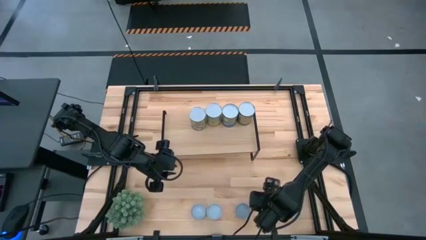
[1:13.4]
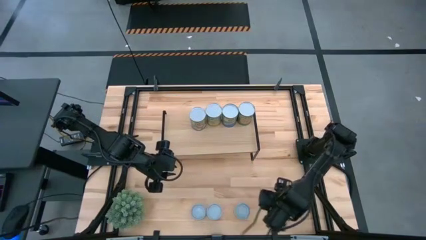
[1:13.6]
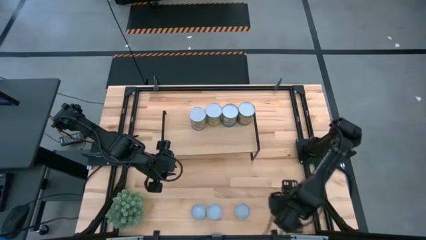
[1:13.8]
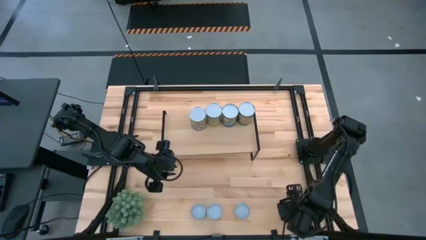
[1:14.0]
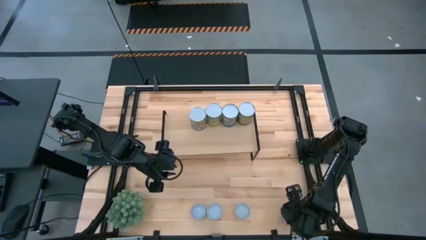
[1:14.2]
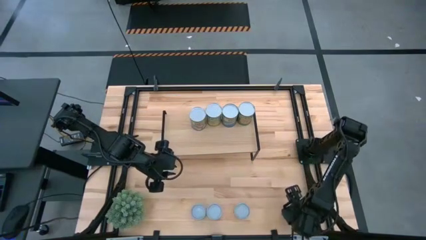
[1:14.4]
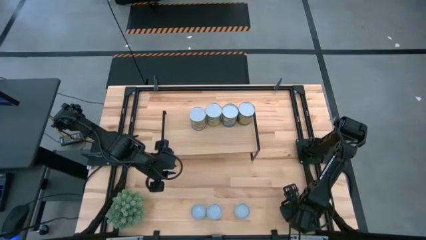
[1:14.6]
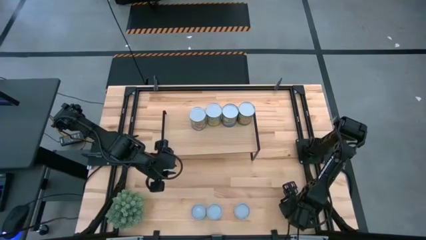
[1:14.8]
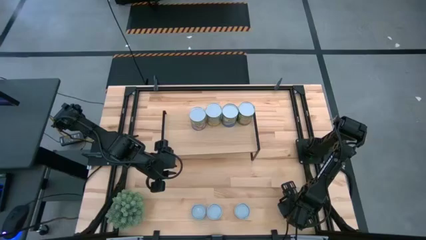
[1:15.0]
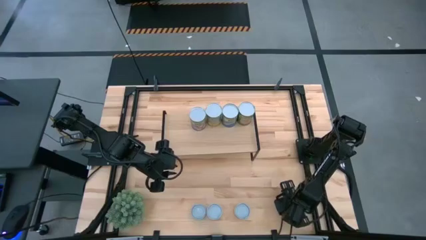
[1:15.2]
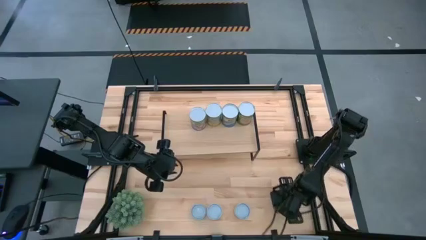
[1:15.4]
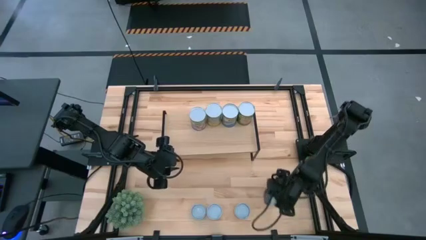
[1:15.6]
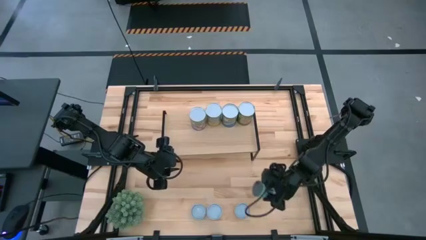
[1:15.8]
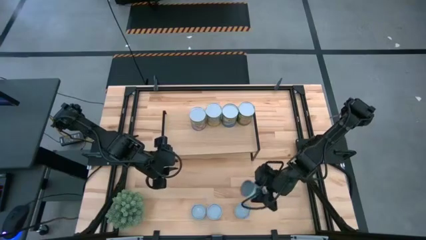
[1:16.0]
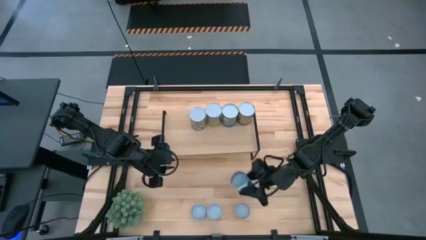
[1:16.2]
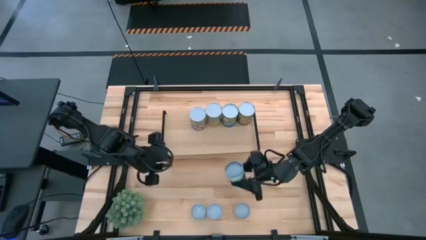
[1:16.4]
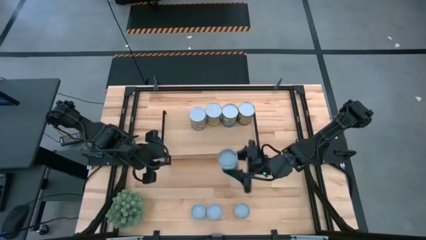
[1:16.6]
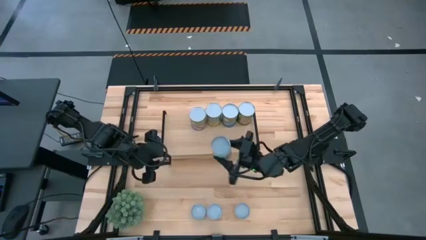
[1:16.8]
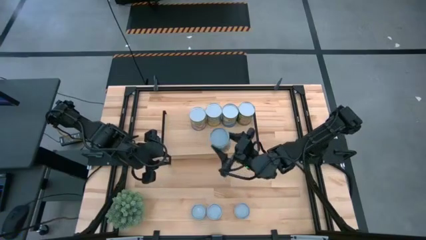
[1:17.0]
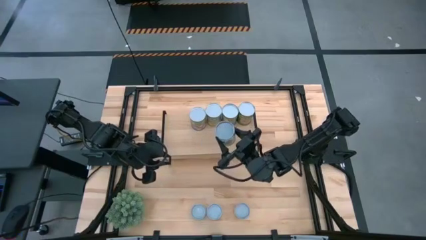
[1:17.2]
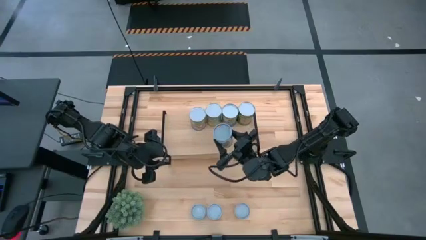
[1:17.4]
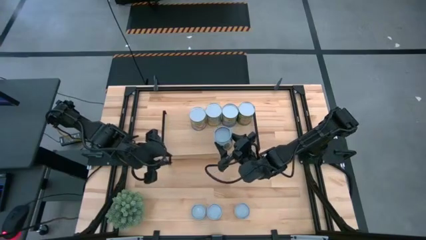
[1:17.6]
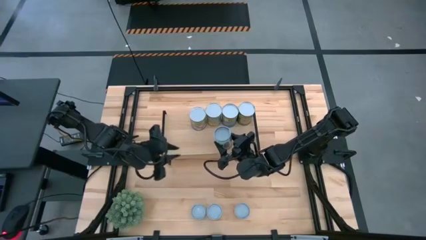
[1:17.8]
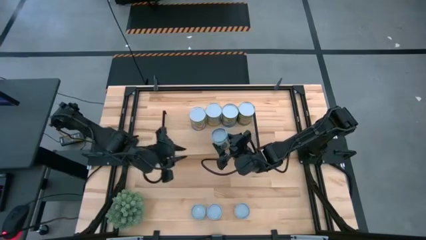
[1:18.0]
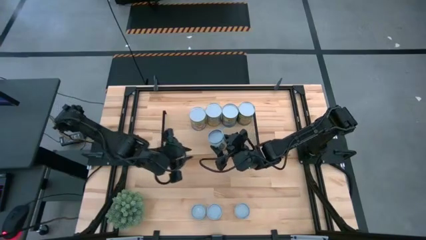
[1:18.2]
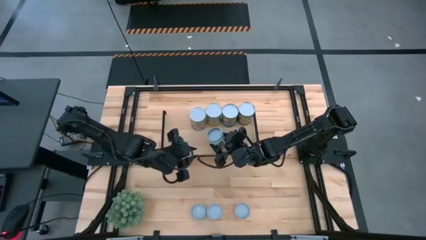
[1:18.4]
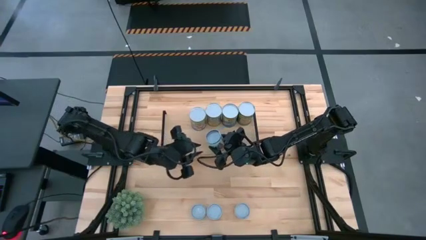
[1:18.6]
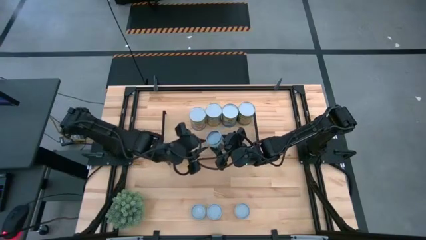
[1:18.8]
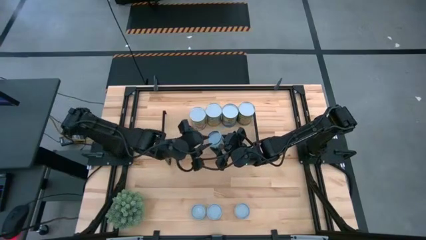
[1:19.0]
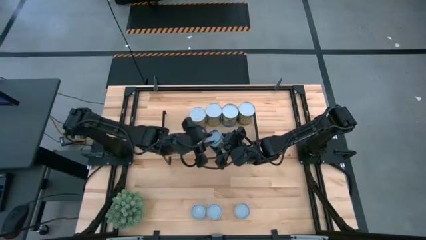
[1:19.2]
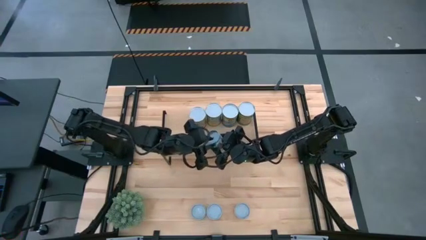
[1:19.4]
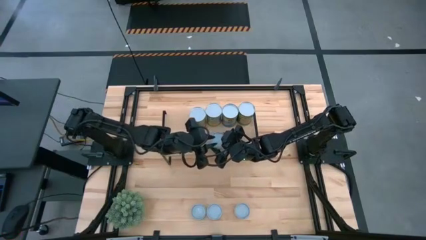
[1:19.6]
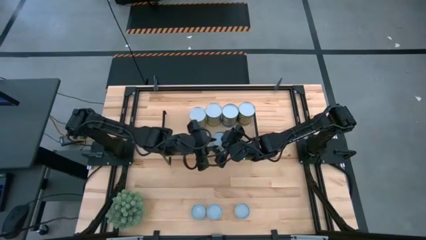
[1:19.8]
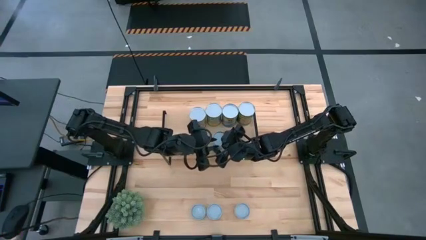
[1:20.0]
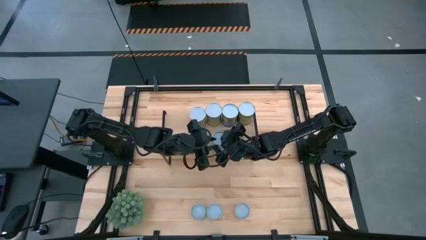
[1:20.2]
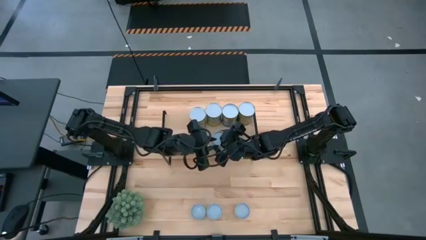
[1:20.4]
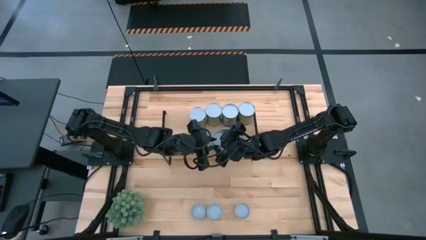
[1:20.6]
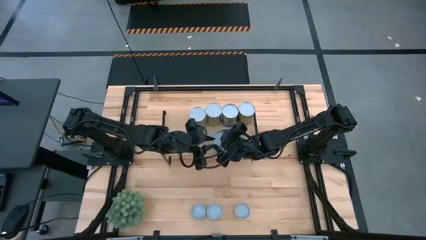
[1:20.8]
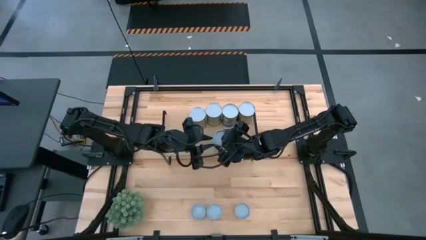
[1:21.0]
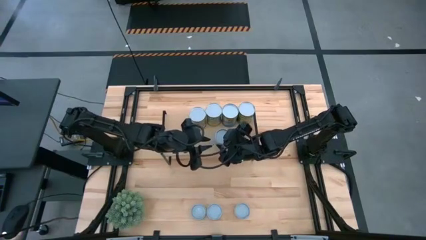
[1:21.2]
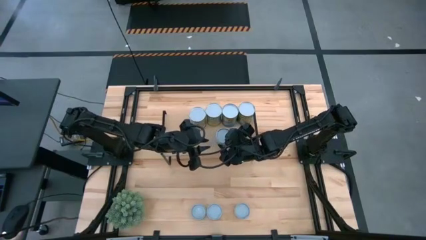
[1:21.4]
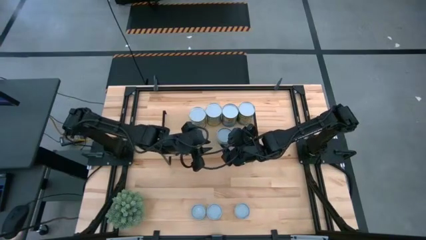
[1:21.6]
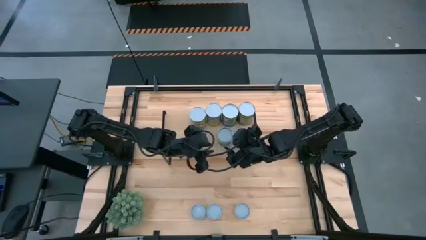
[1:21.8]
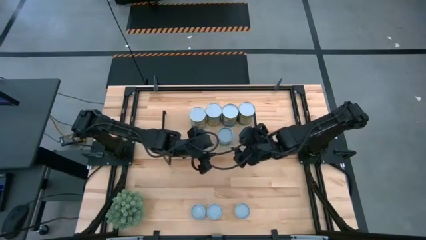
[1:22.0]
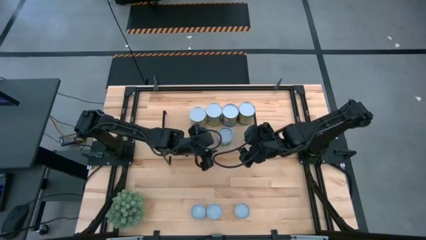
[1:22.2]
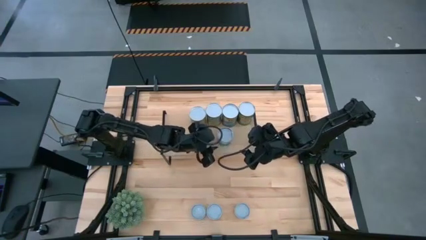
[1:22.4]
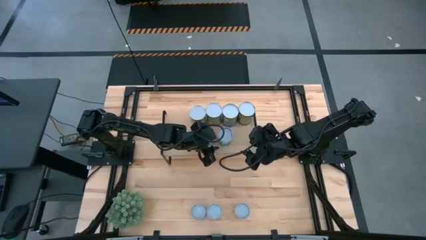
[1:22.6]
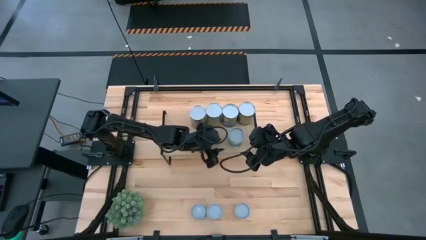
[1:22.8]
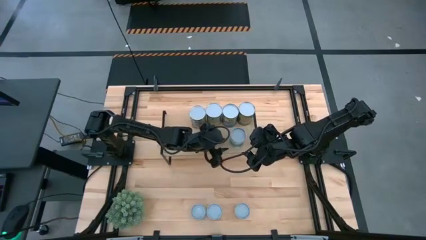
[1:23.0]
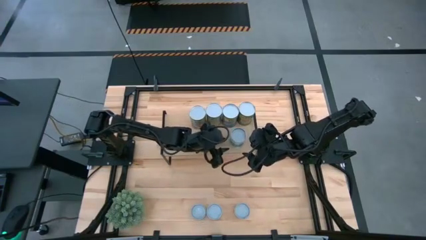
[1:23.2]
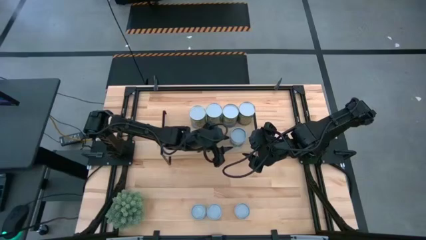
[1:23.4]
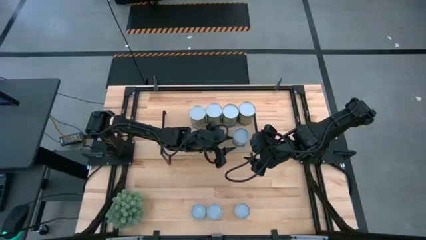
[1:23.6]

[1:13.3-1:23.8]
Task: Pick and place cans onto a shelf
Put the canned mixed vegetables on the shelf

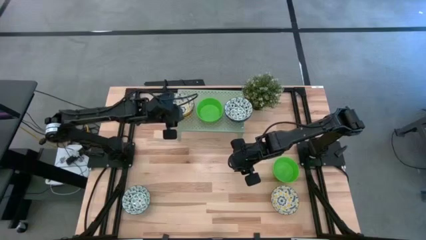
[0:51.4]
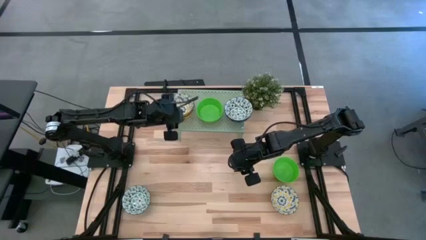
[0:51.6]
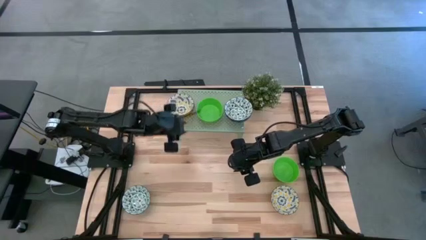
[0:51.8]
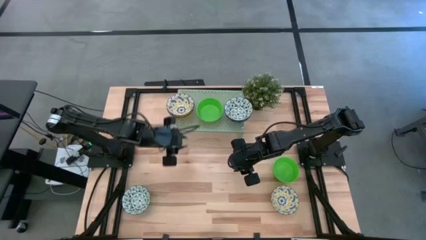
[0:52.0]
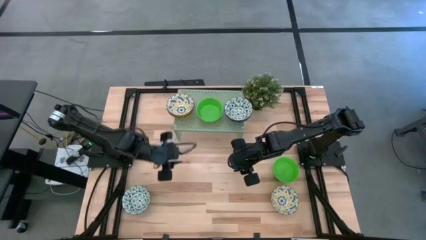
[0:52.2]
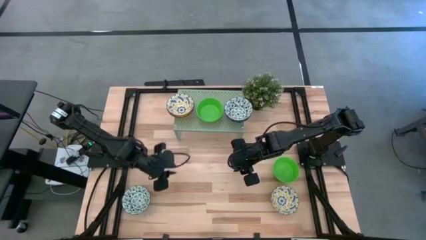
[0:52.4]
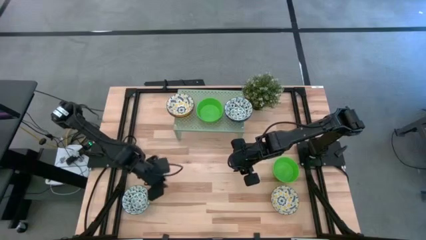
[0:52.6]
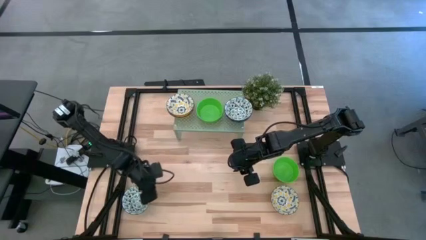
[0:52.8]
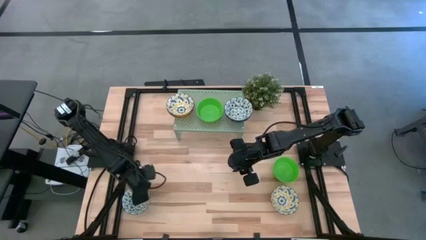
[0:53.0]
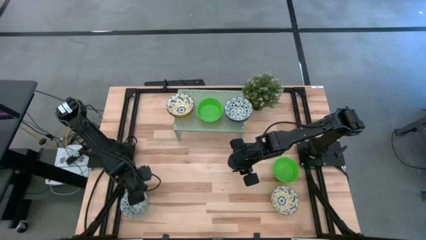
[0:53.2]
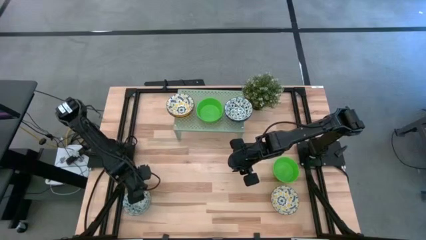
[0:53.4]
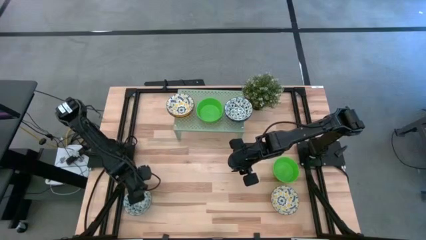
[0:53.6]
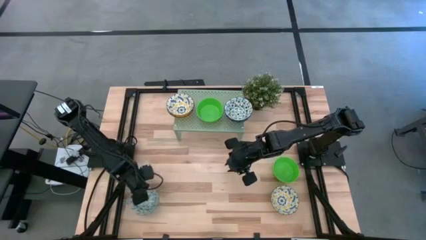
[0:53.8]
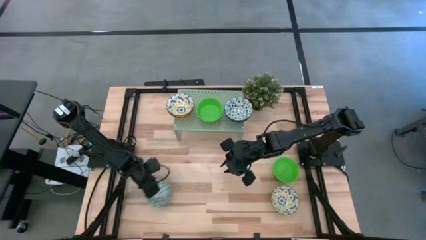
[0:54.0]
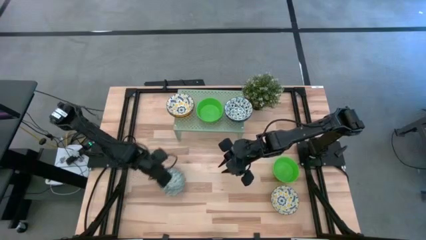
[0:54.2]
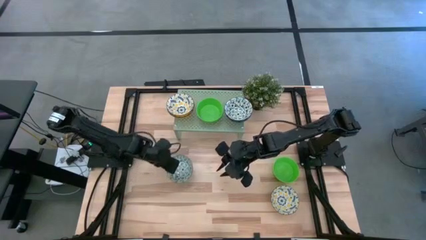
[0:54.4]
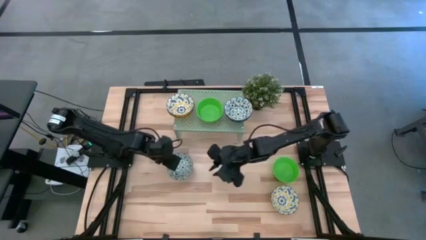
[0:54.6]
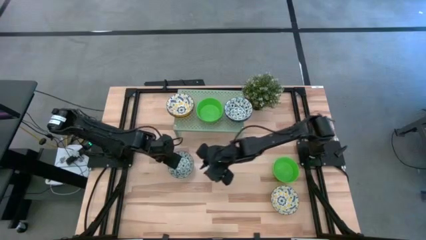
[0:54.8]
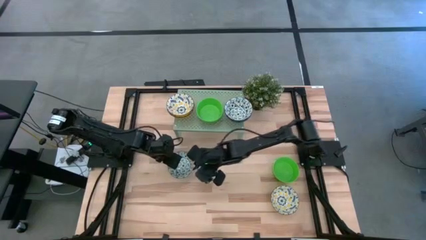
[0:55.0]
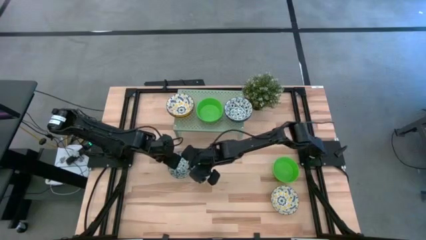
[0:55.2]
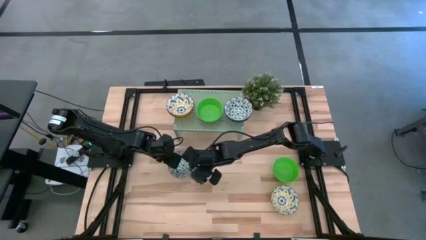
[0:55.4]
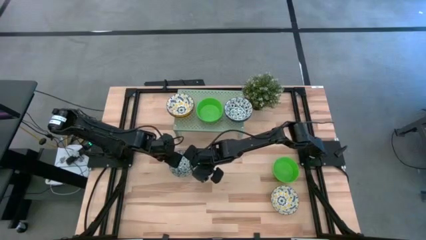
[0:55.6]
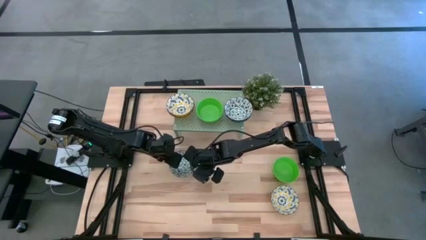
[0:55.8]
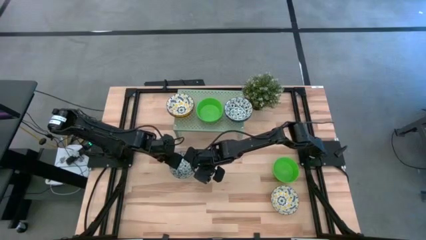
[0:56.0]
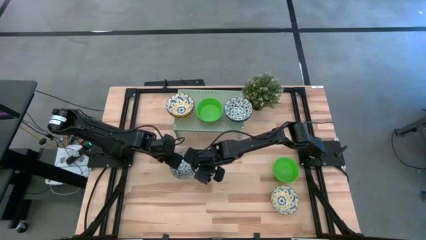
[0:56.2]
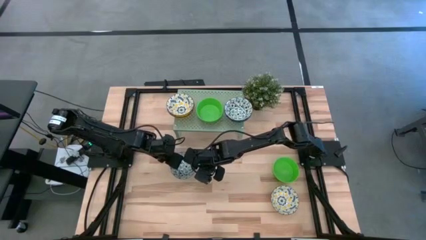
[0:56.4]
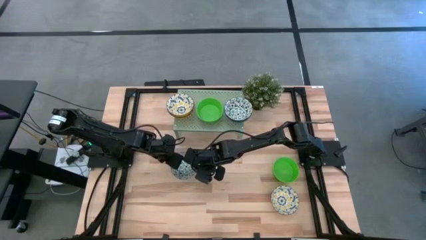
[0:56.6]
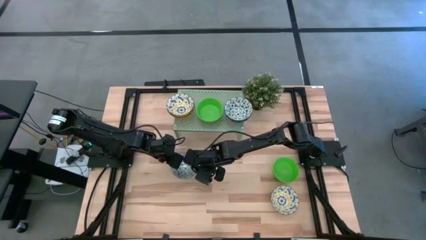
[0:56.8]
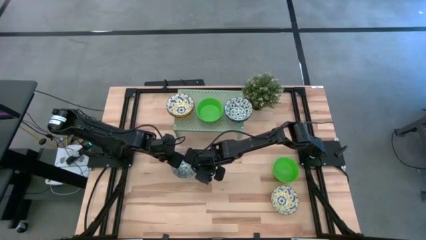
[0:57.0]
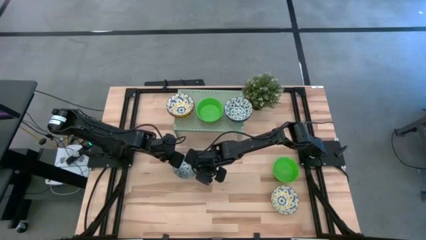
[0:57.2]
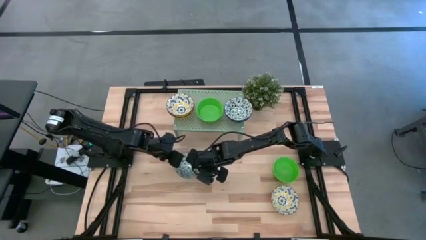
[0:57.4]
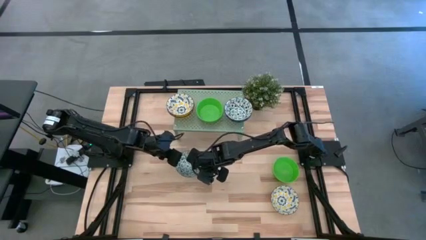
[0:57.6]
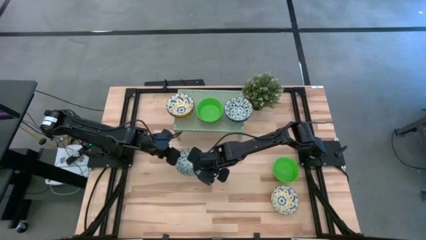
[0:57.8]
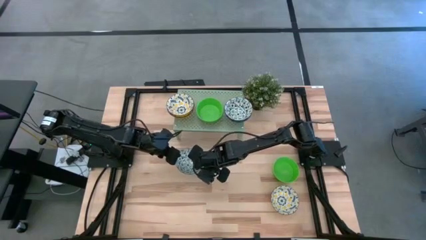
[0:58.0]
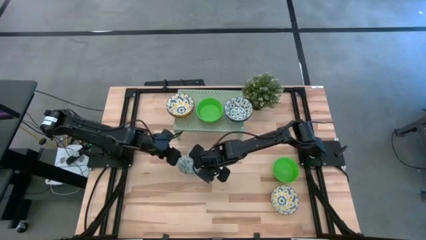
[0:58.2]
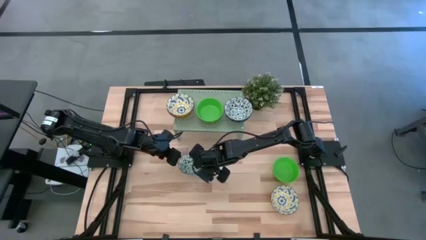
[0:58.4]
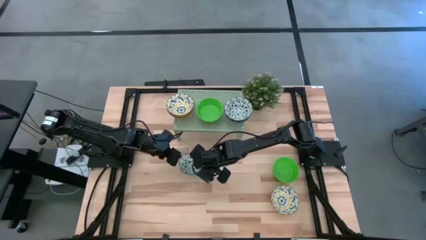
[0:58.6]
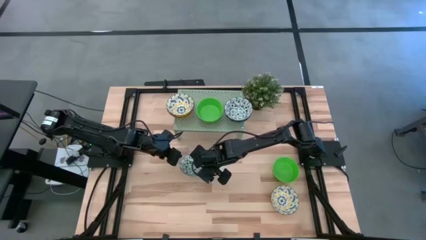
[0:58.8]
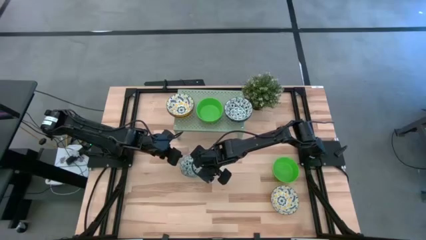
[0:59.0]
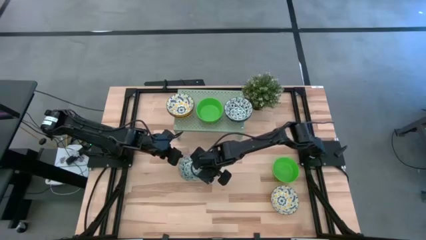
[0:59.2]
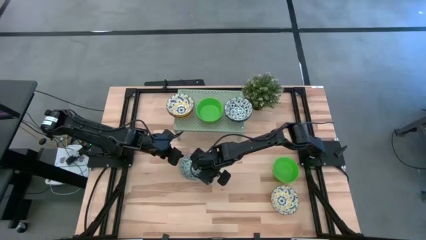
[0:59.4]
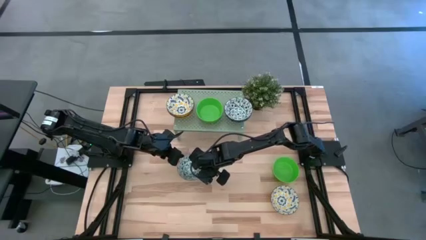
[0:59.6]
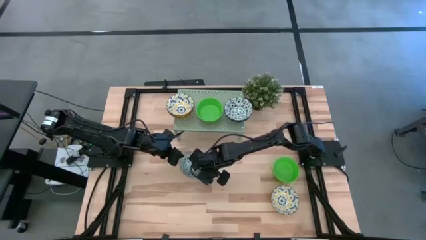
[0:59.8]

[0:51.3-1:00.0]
Task: Pick & Place Mini bowls
Stack the blue and white bowl on top of the blue and white bowl on the shelf
